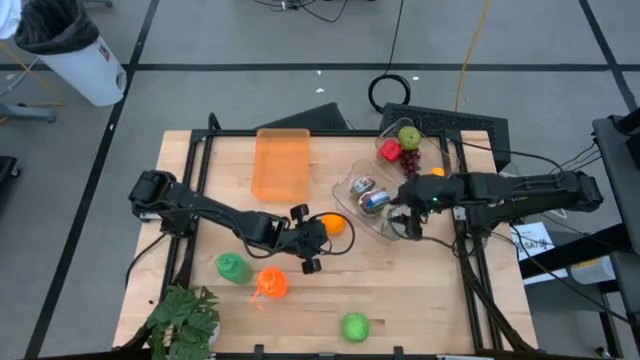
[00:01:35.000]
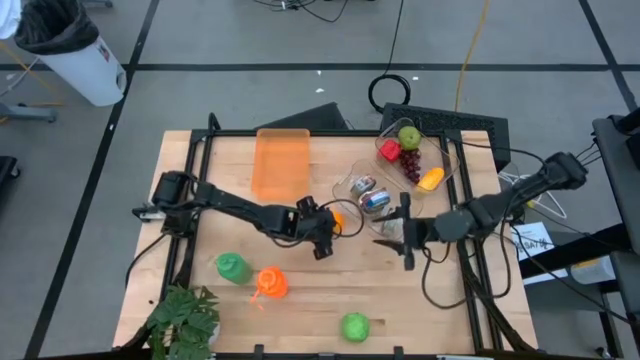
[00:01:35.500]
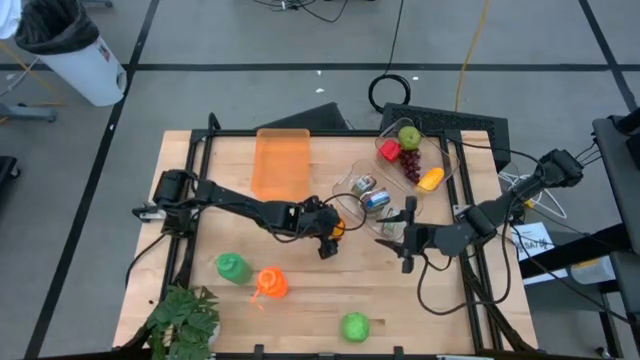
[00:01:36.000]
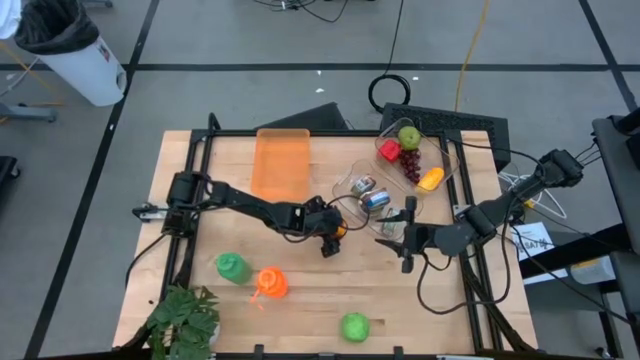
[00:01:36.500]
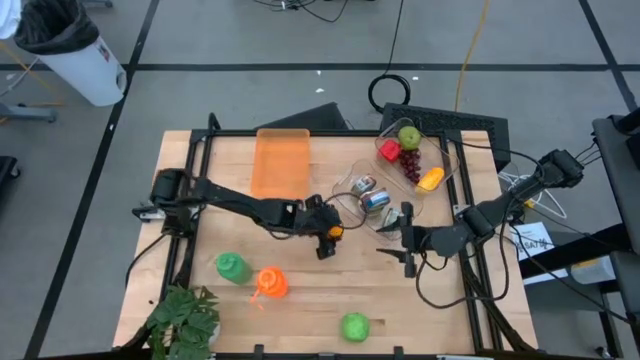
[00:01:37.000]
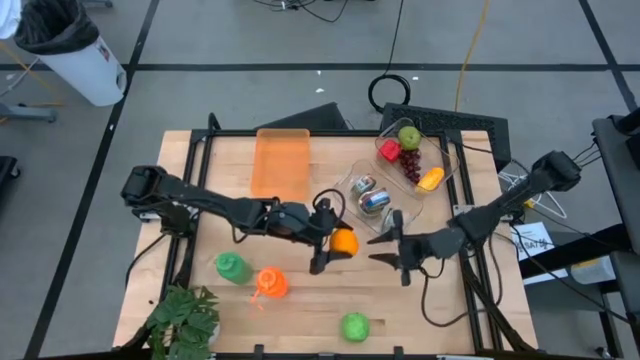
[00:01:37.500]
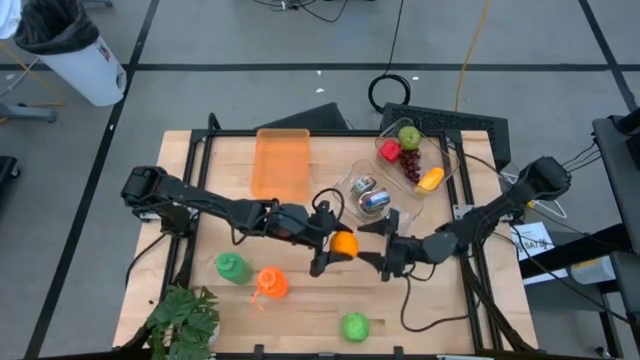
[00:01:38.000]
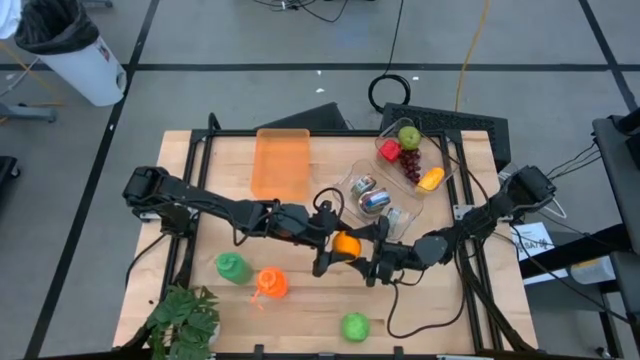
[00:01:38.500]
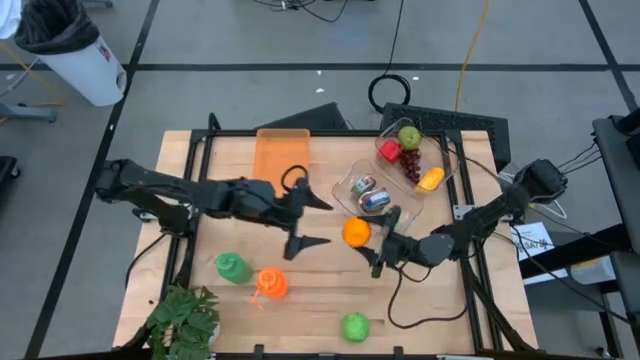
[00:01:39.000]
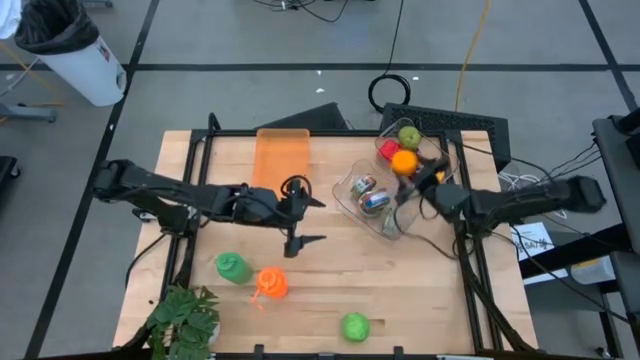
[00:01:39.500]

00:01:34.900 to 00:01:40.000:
Task: Pick & Place Food Item
Put the orange into the right transparent bin

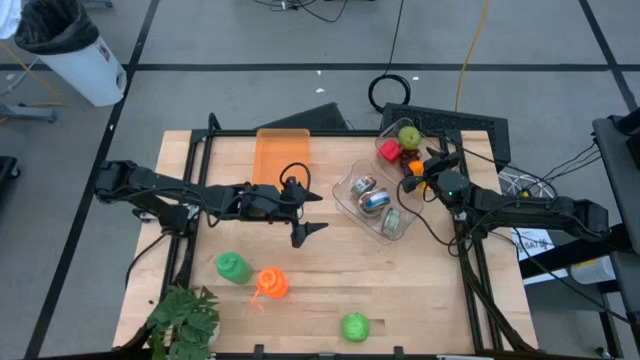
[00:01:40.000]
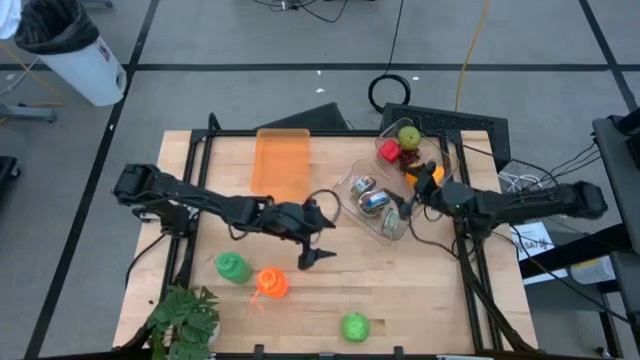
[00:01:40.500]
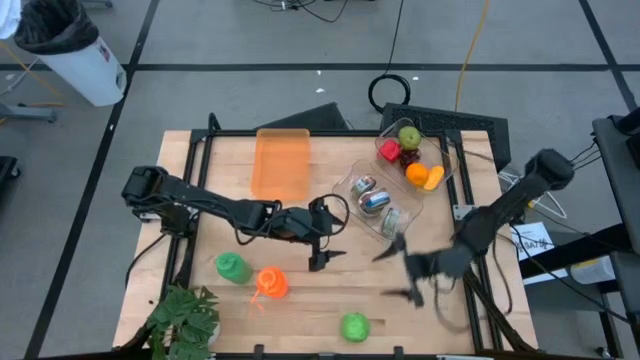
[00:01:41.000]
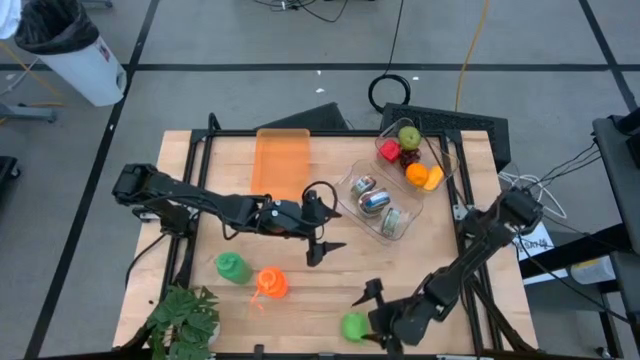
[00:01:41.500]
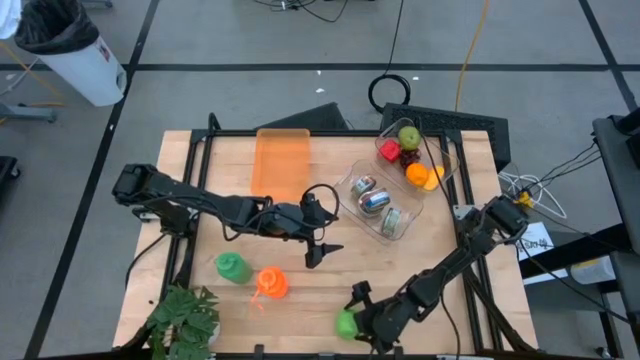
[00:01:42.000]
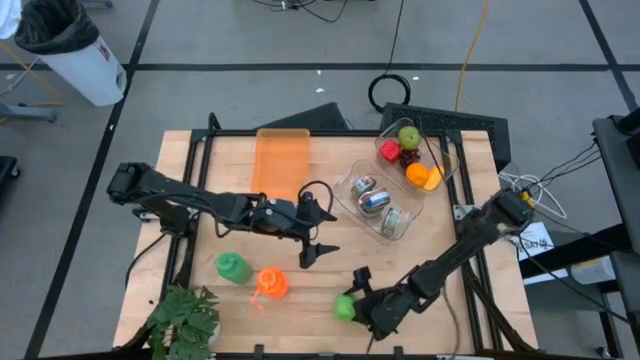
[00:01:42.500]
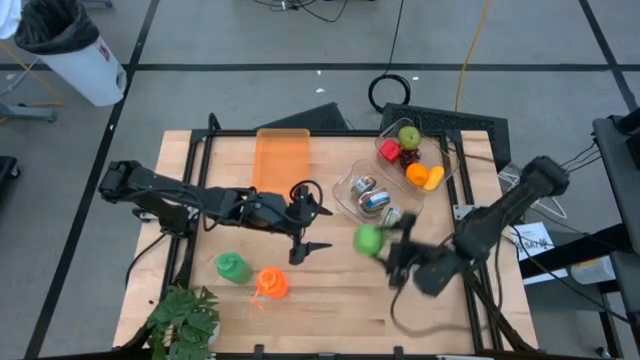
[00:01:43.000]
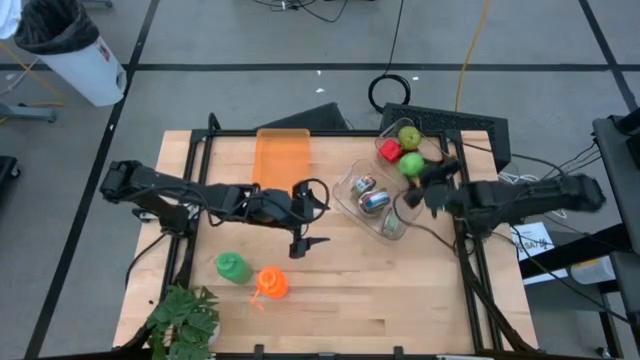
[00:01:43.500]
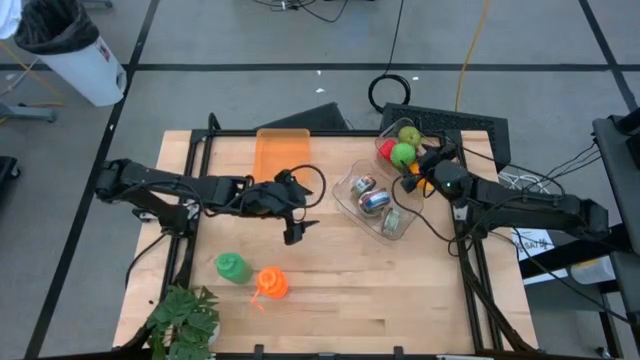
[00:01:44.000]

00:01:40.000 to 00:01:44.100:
Put the green apple into the right transparent bin

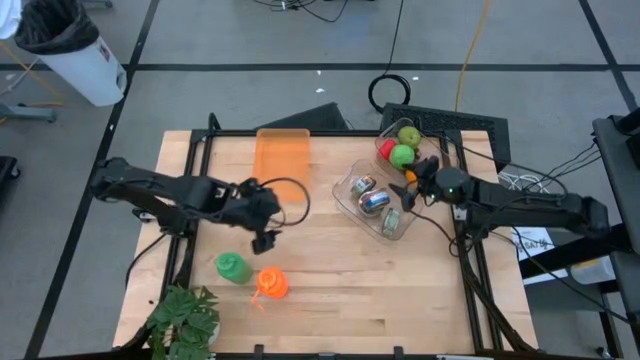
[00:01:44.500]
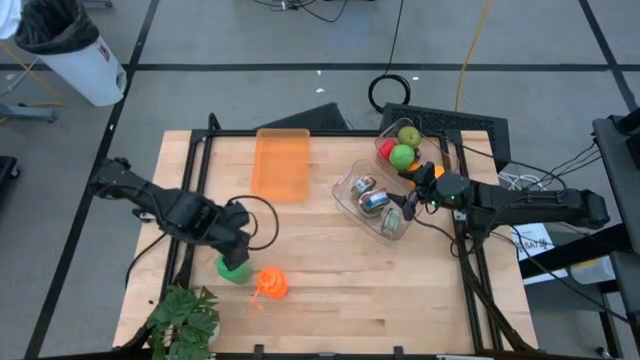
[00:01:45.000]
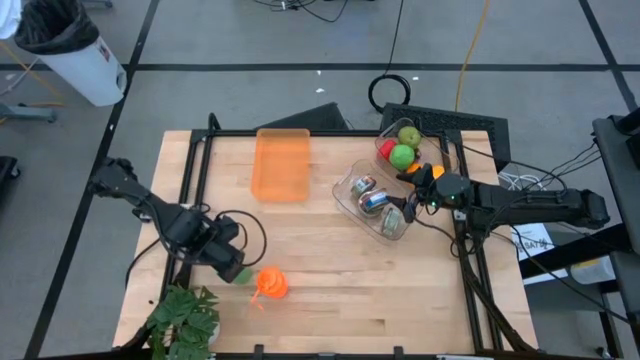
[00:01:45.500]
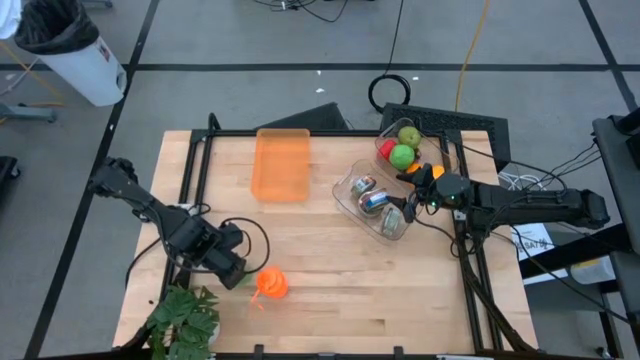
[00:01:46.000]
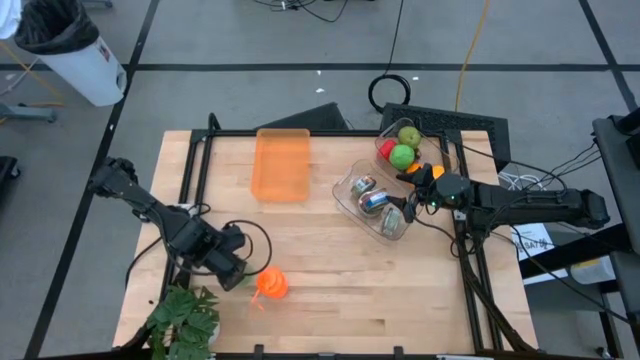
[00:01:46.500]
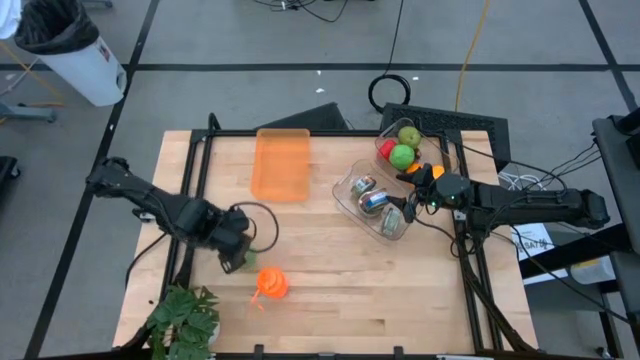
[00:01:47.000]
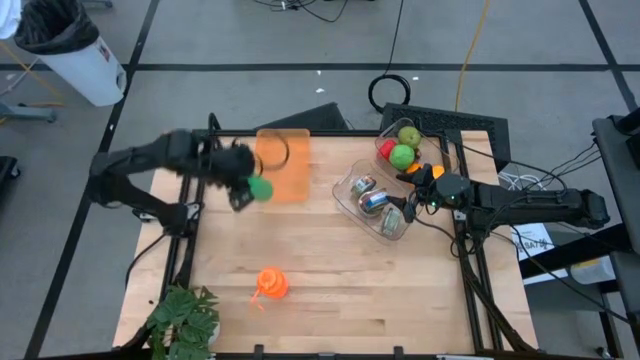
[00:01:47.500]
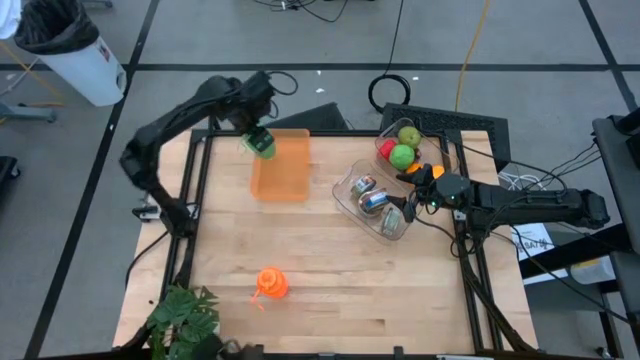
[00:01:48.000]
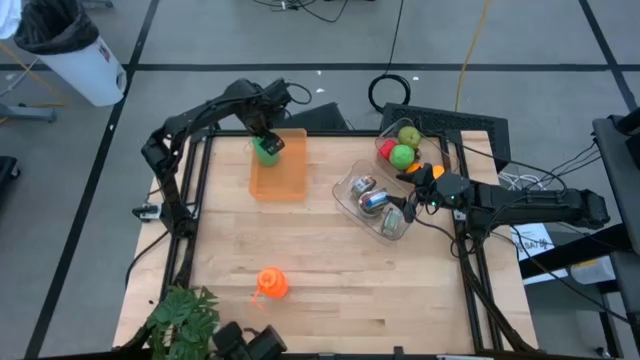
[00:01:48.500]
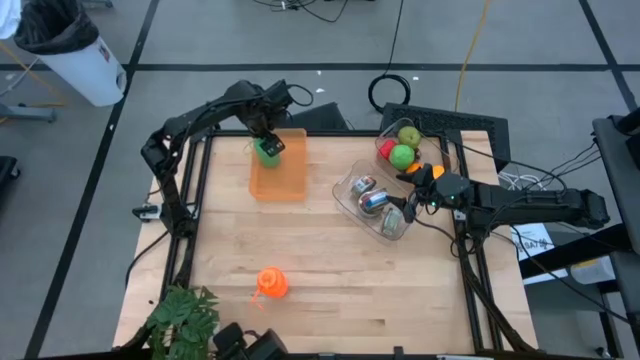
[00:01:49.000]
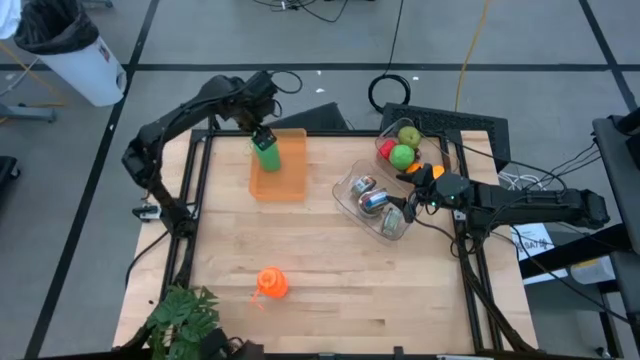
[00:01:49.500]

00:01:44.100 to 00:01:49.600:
Put the green tumbler into the orange bin

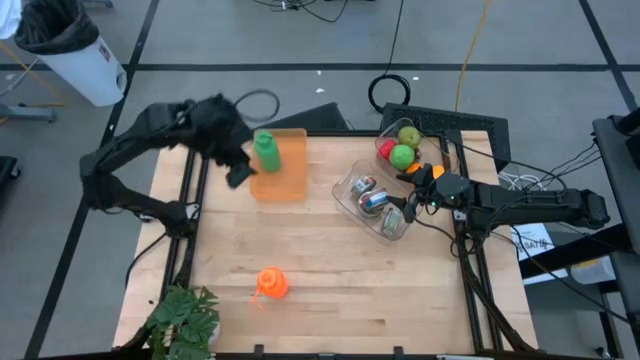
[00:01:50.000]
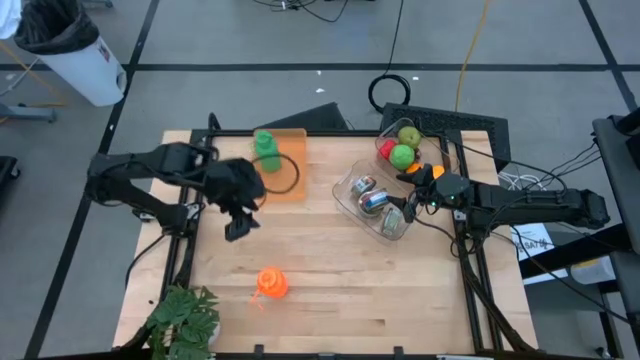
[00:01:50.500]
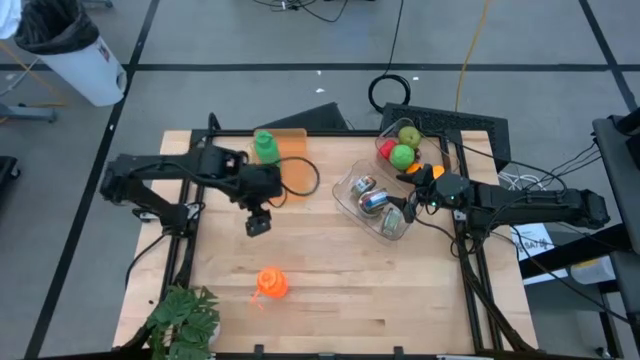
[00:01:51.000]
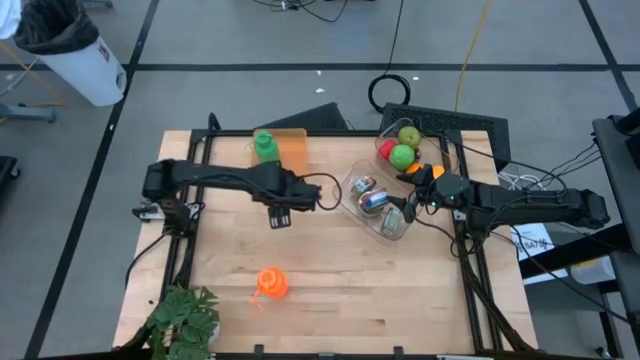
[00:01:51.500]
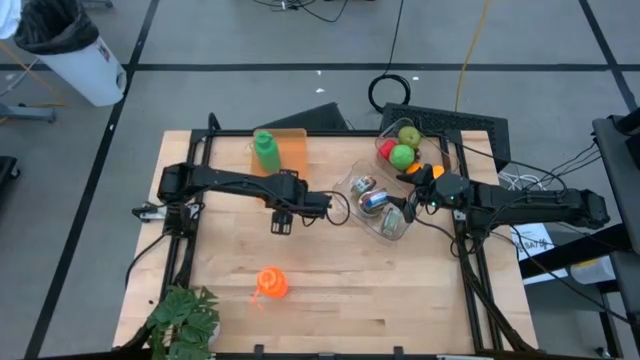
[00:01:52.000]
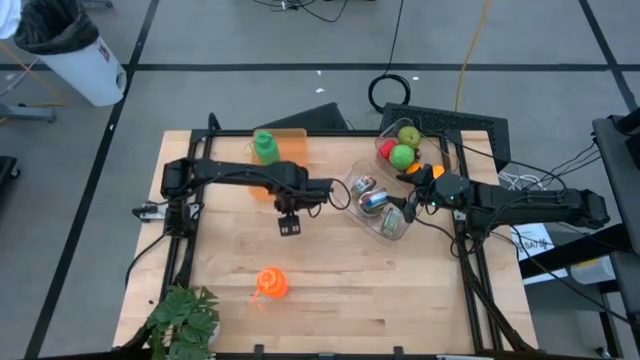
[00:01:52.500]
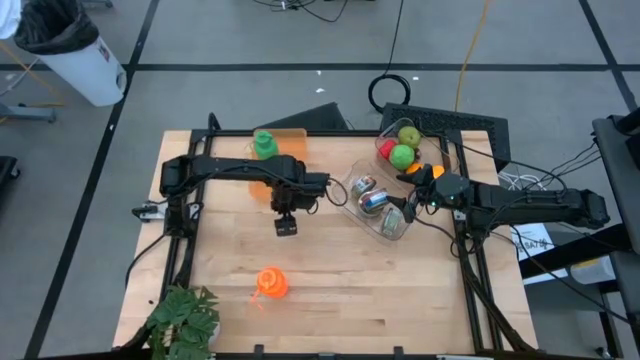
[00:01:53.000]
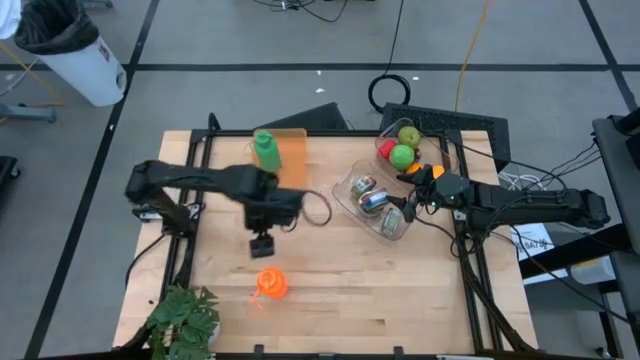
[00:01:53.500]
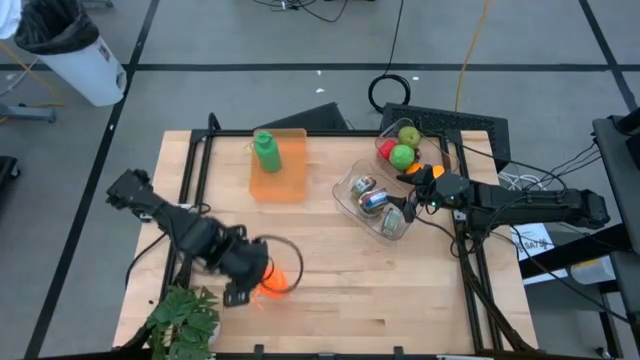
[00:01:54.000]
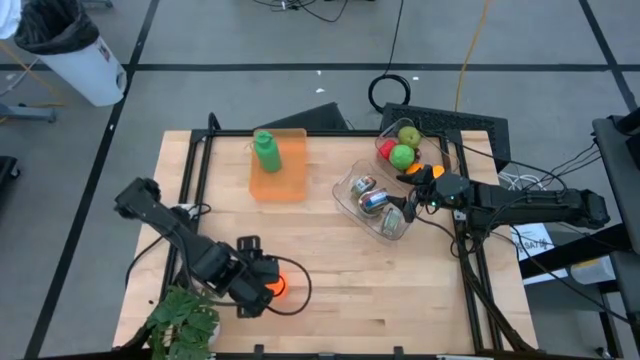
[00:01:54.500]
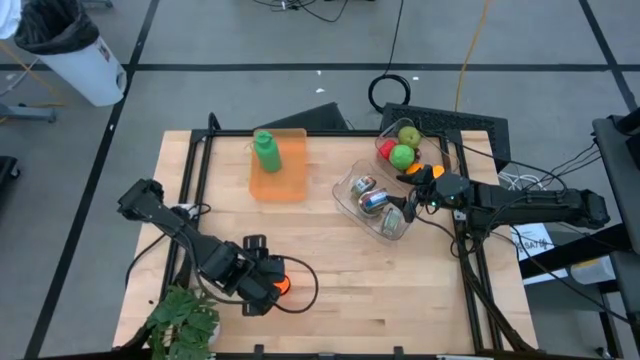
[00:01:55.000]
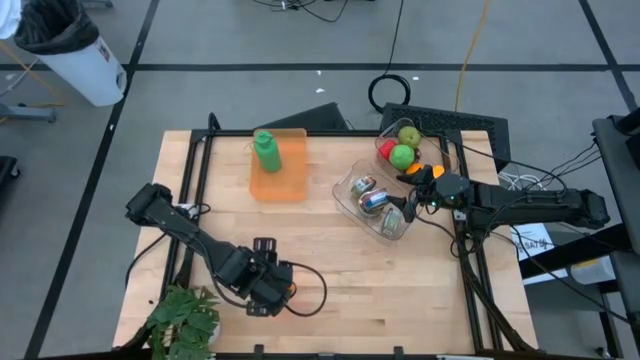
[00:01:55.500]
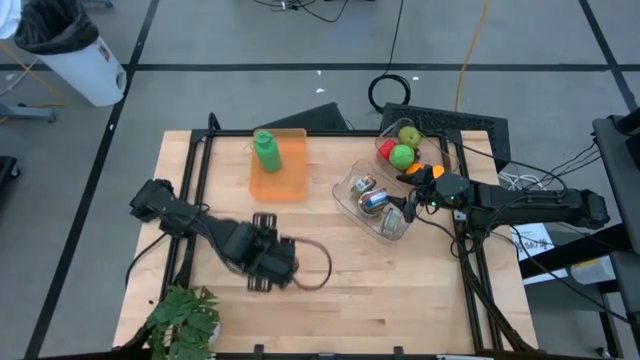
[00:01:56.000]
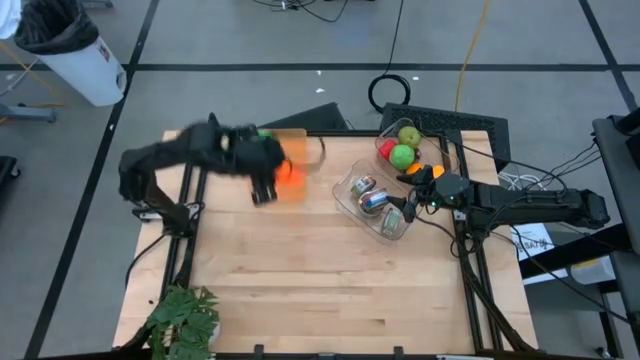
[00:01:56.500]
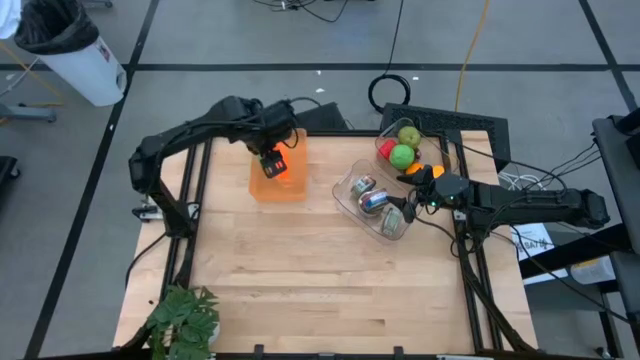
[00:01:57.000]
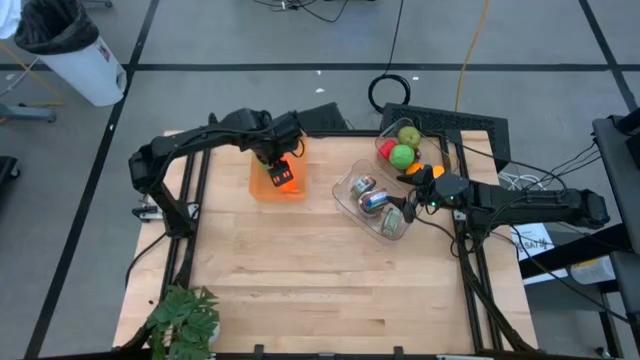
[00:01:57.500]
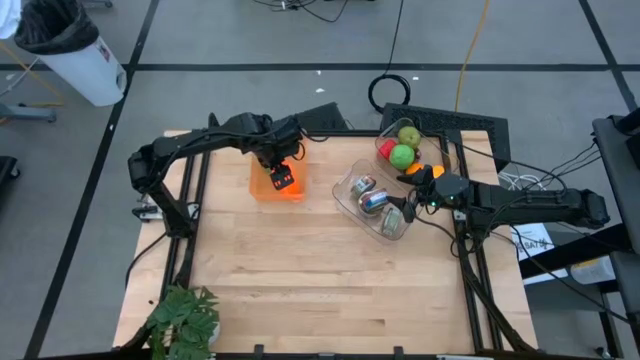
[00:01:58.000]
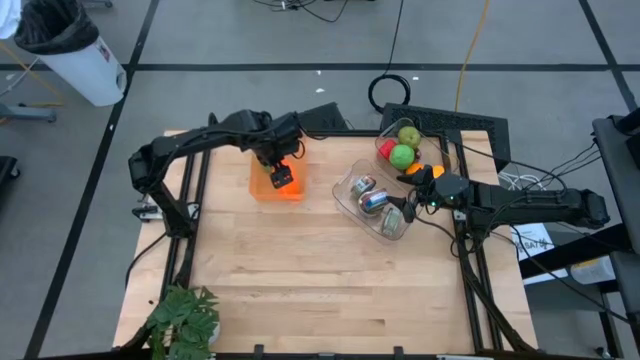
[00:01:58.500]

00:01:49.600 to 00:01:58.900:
Put the orange tumbler into the orange bin
